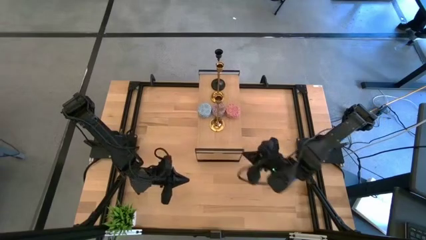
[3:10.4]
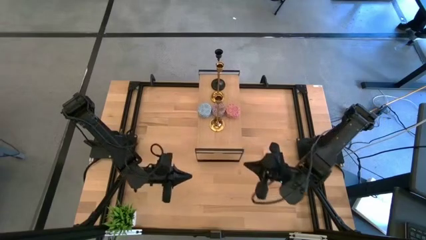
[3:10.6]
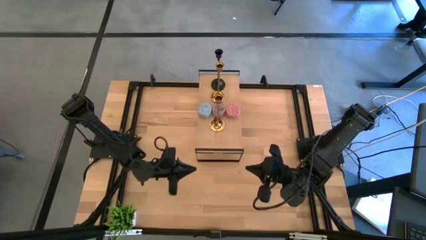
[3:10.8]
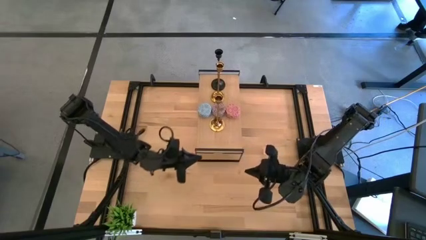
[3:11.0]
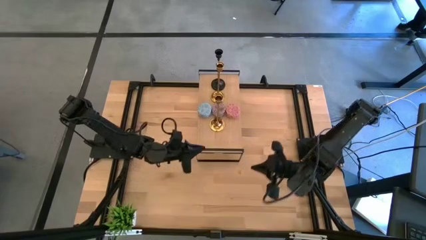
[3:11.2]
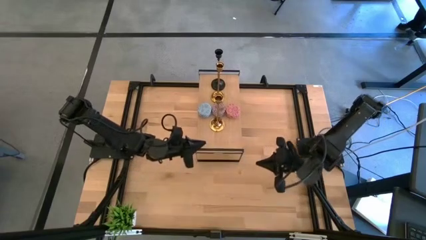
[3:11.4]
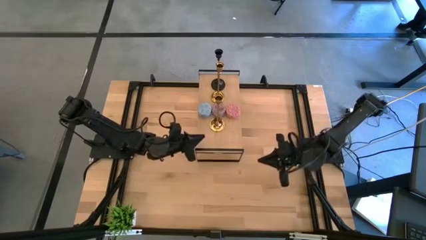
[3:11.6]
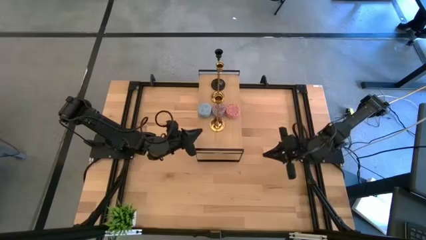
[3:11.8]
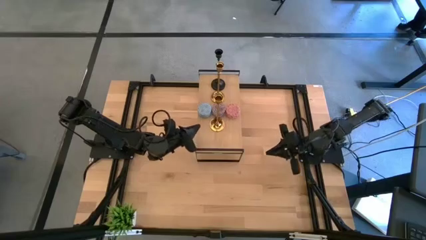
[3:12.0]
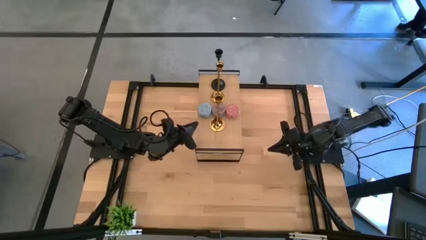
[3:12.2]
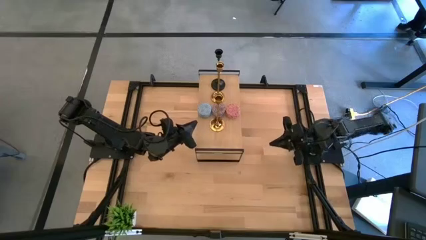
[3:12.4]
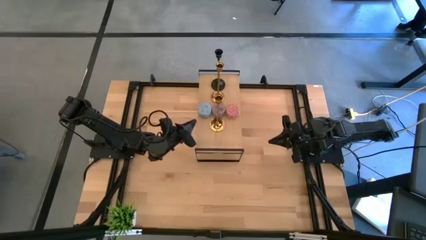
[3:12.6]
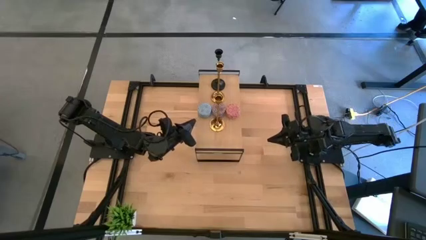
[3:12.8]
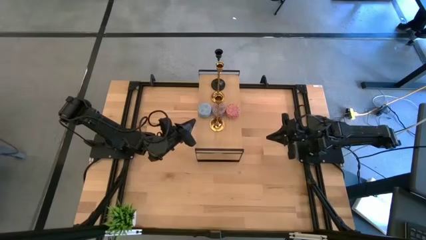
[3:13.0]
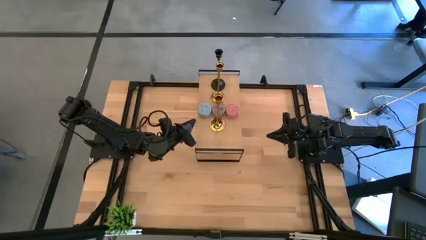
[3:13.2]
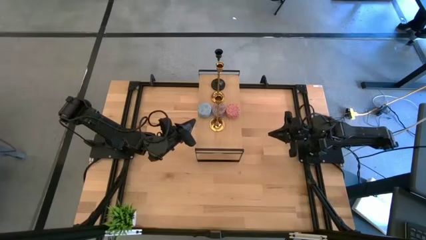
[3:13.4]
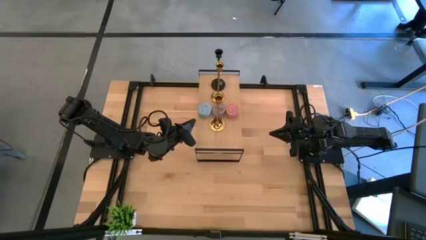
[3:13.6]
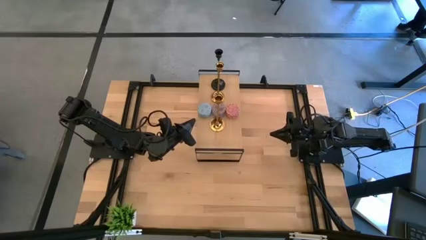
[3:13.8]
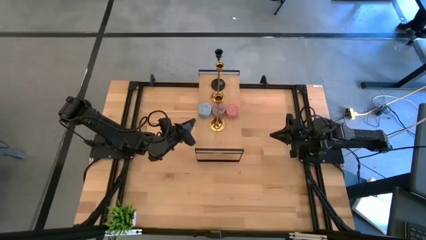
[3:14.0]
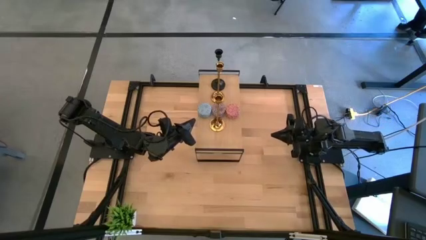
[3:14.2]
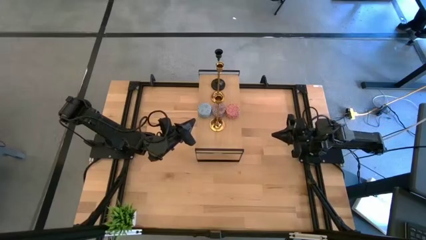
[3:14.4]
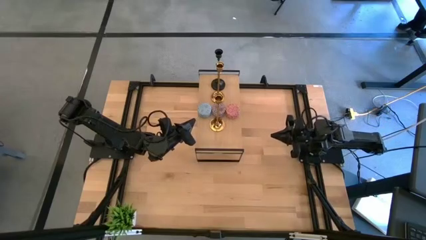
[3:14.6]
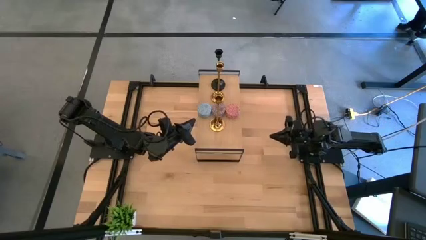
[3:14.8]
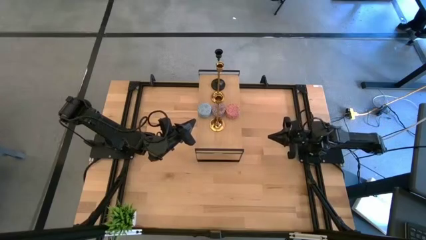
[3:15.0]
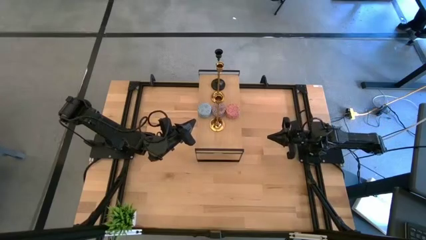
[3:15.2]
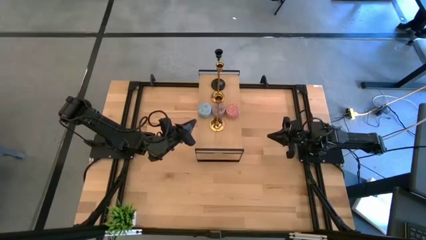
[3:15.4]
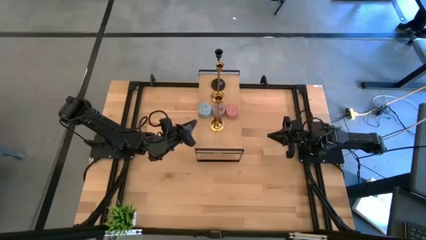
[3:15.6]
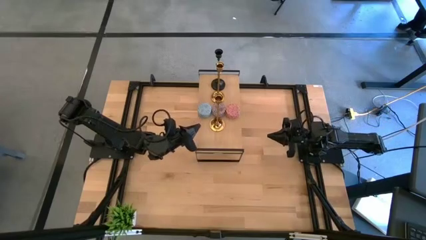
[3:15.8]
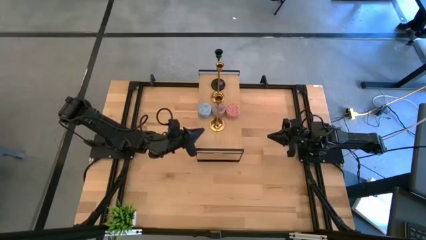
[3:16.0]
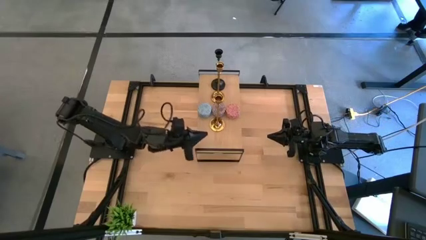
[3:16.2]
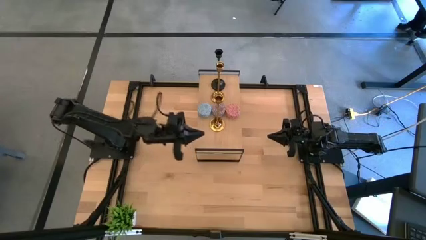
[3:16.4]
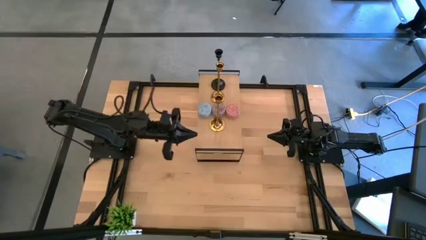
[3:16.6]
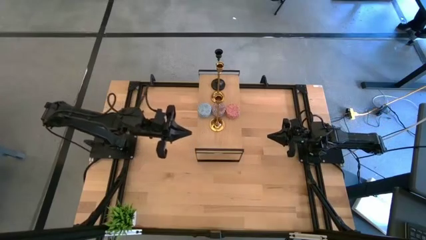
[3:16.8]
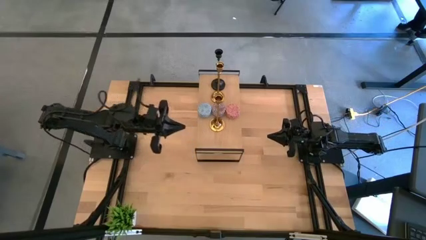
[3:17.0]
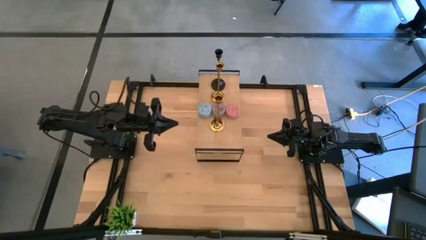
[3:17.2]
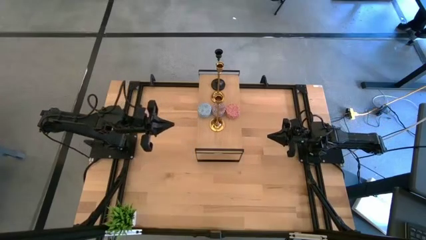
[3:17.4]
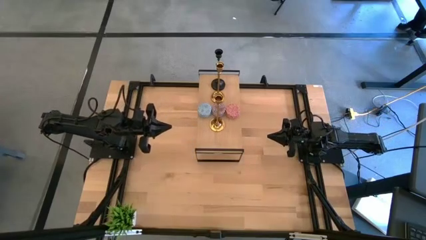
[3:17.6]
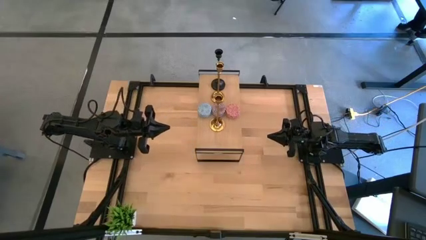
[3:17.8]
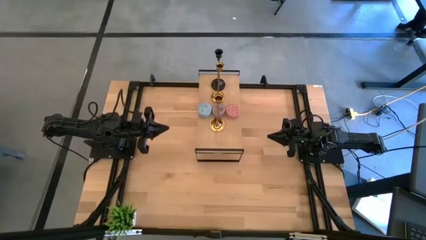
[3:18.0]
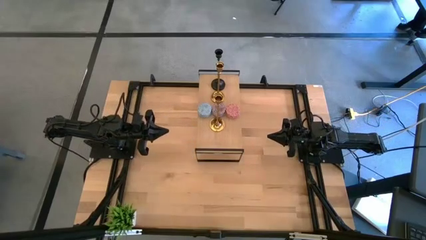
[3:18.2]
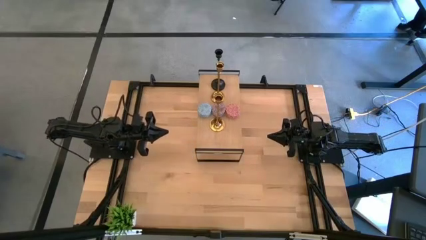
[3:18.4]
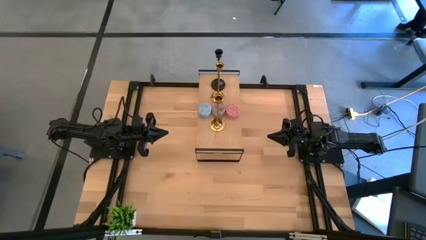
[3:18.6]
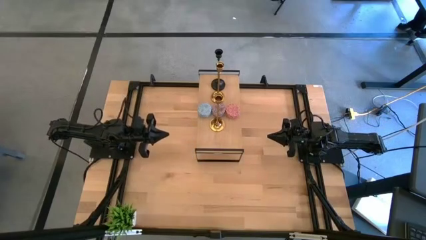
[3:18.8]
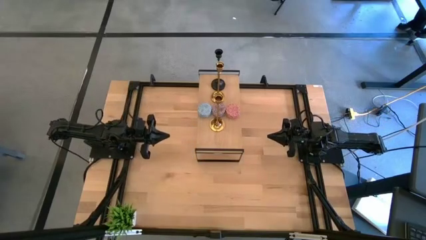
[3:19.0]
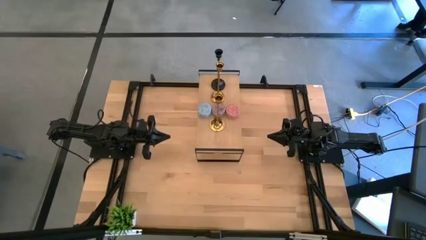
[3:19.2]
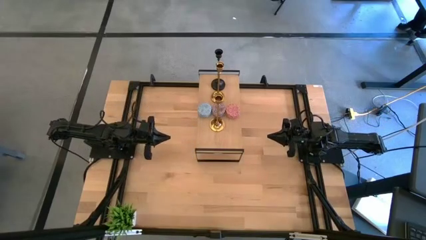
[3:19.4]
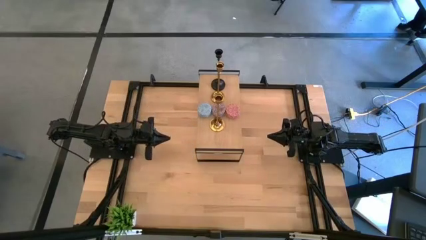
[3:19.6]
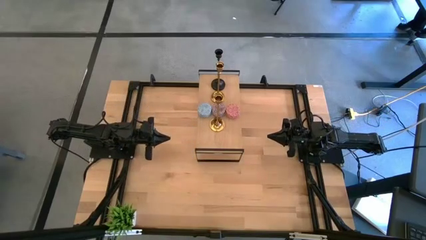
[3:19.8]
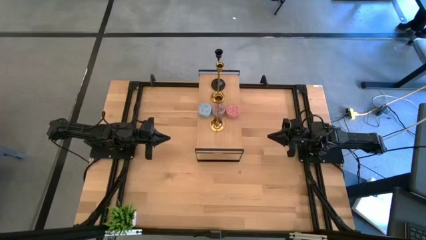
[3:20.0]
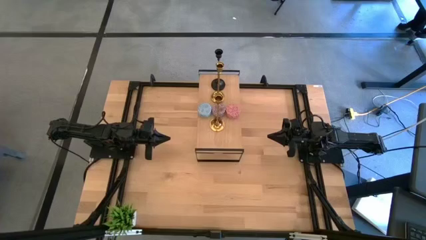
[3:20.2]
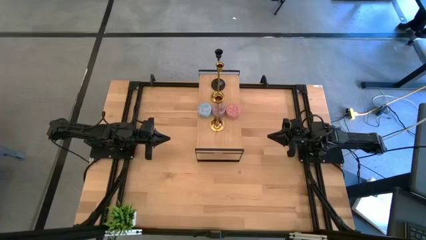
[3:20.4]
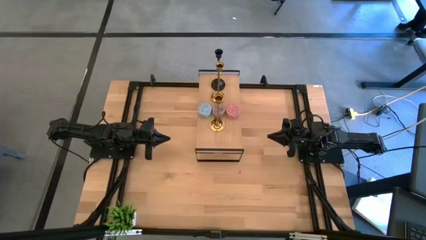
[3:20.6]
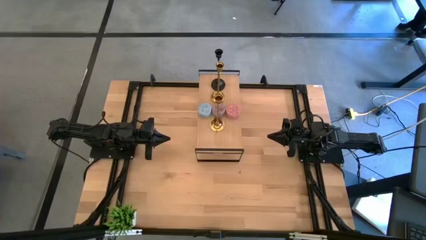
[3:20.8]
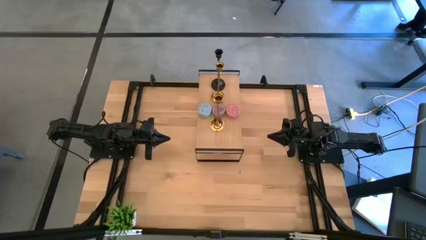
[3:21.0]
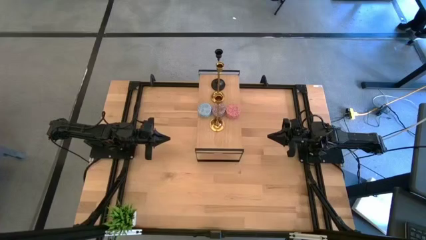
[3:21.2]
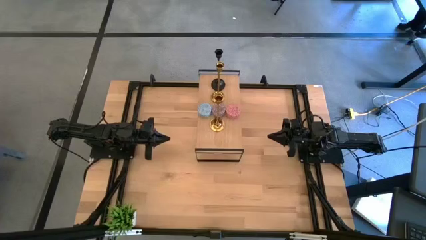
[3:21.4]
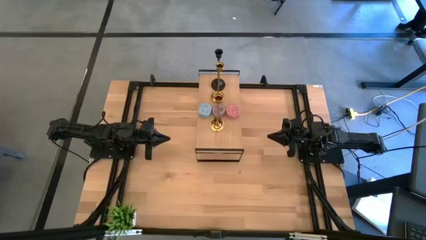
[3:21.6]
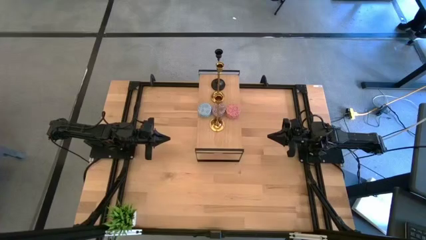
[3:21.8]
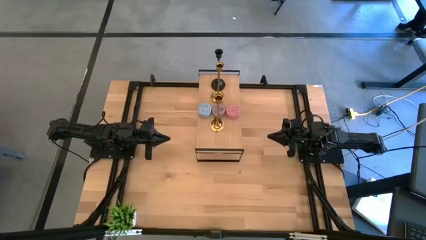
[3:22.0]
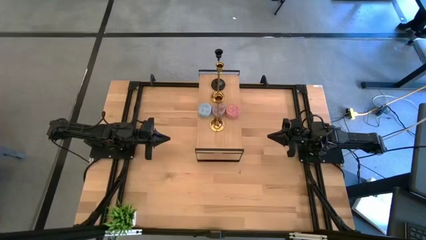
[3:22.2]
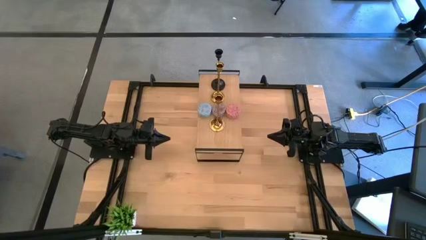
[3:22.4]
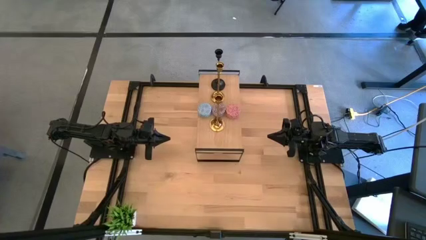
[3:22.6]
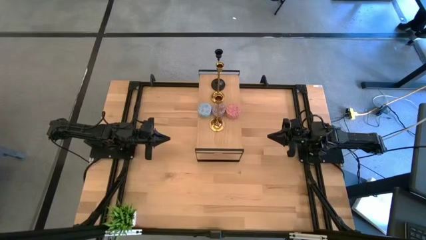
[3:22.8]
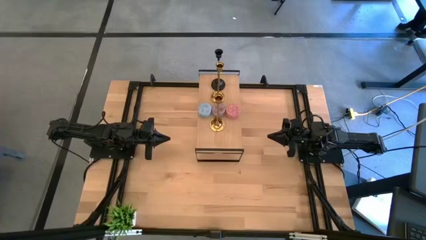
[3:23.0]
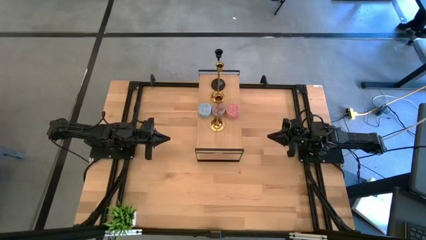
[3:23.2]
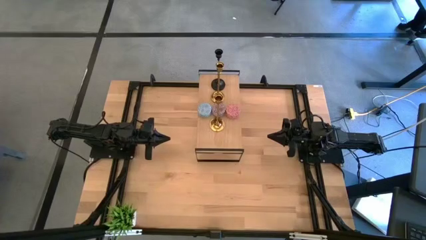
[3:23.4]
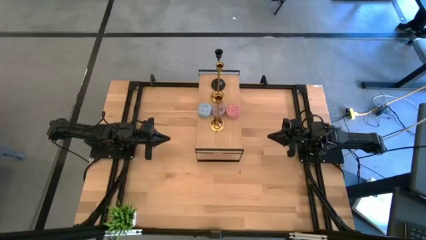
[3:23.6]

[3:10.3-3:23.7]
Task: Pick & Place candle stick holders
Return to Home Position

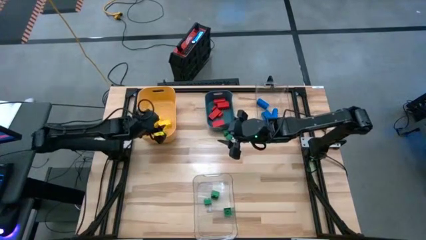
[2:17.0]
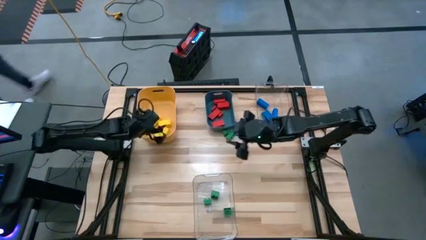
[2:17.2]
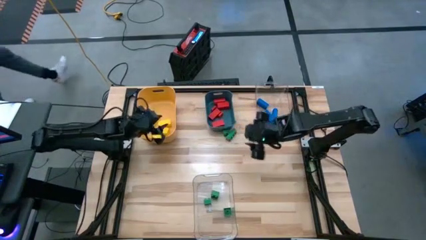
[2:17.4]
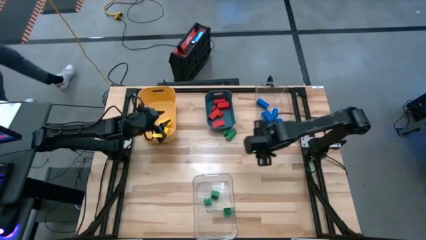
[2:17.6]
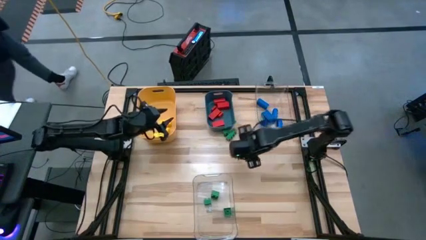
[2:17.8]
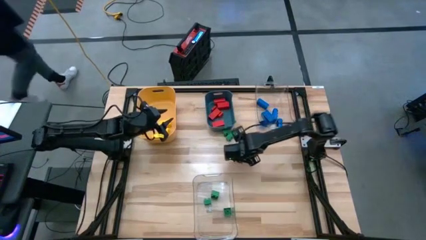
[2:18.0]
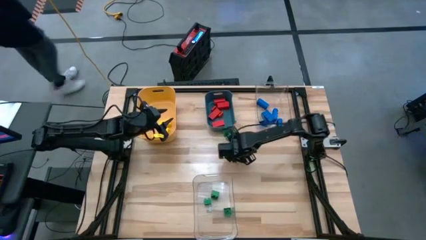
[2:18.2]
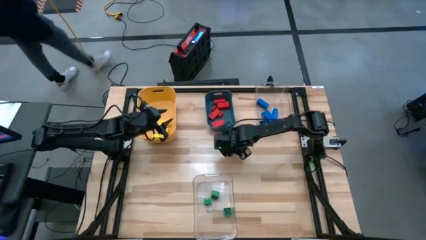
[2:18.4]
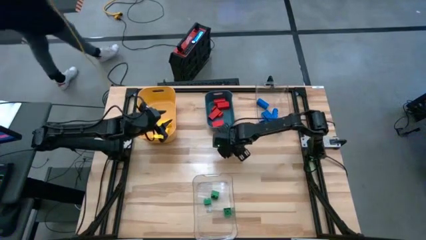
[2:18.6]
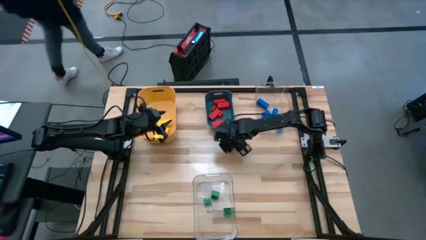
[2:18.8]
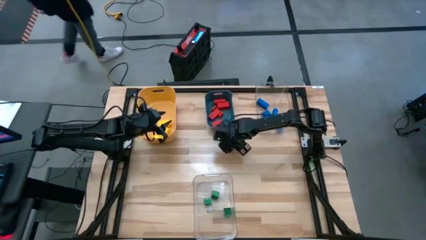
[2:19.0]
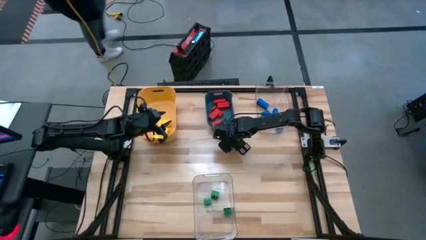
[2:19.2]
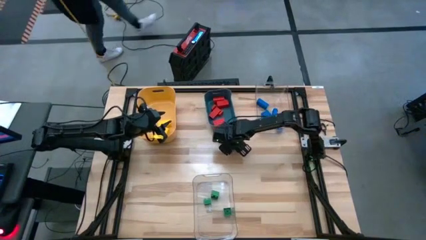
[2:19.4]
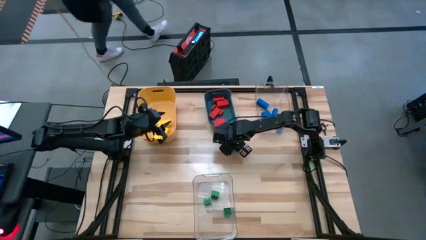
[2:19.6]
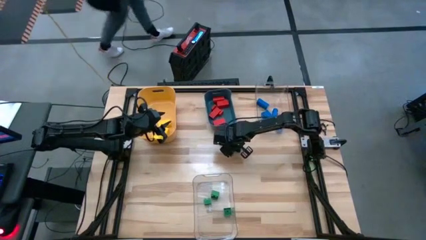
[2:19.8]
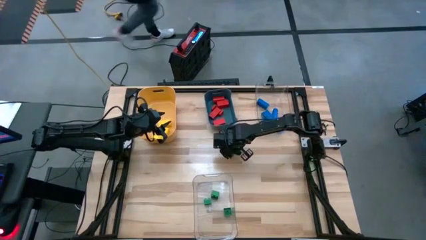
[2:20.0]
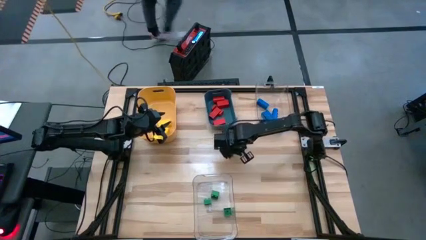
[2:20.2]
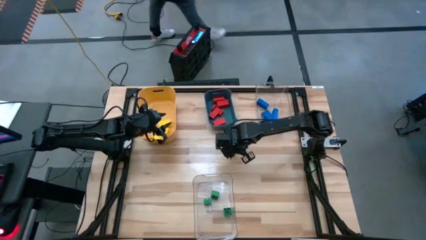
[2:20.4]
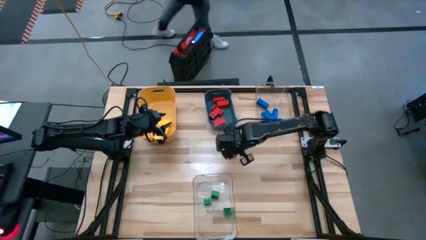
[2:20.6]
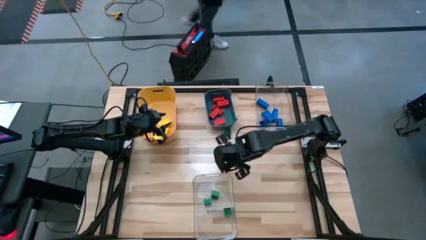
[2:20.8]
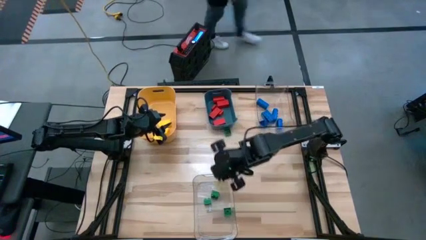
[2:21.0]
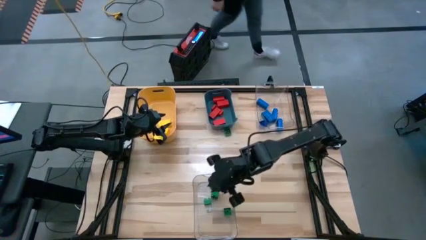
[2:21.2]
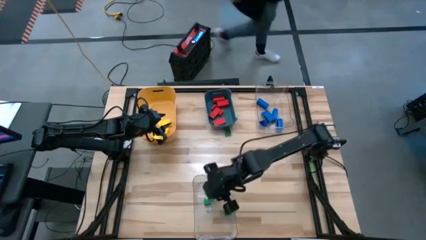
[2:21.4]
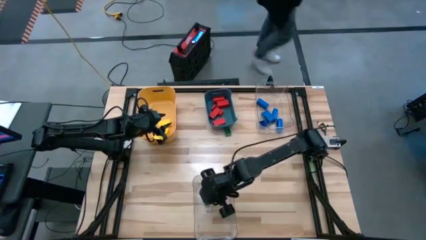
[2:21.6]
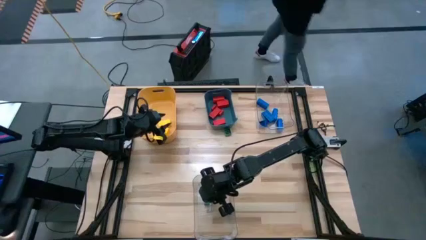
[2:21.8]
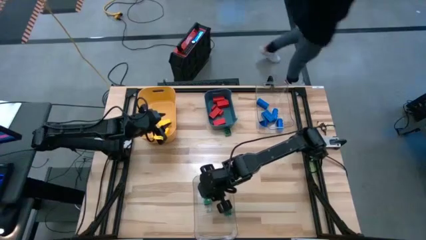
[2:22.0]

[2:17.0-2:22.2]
Task: Sort blocks
Put the green game piece into the bottom transparent bin
